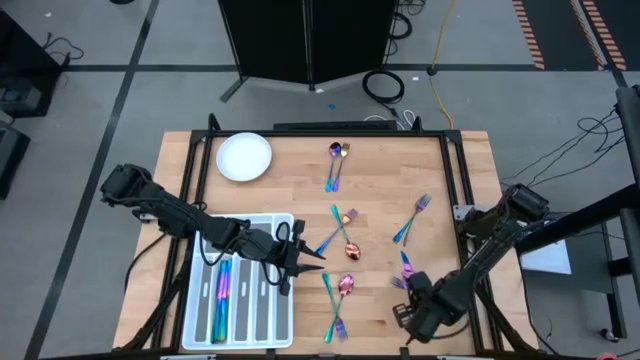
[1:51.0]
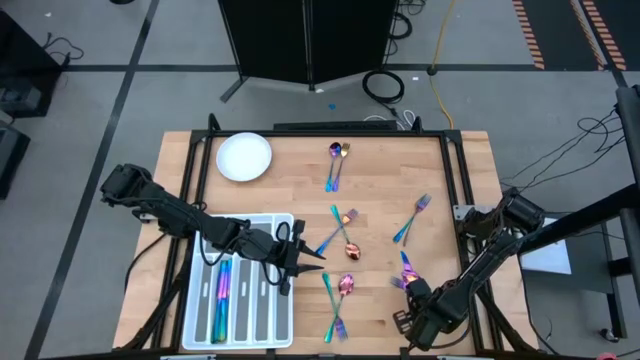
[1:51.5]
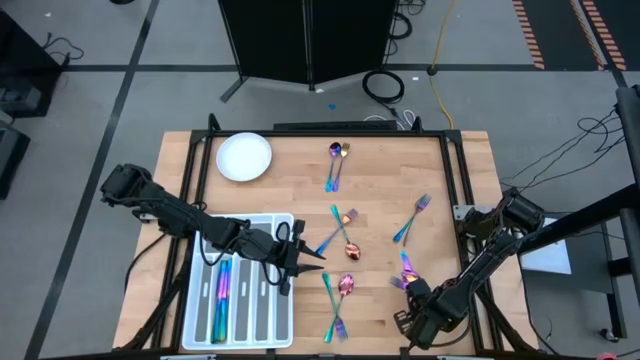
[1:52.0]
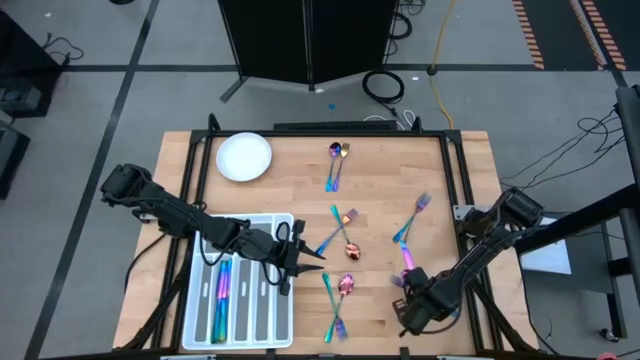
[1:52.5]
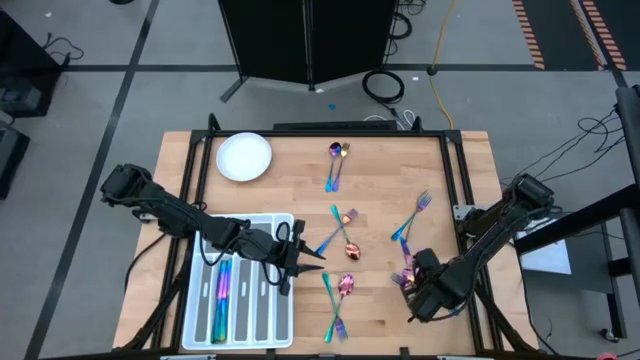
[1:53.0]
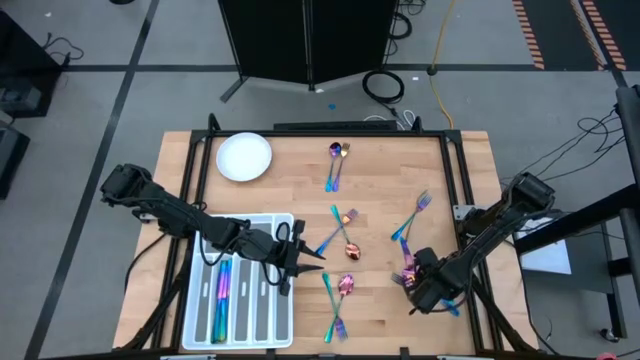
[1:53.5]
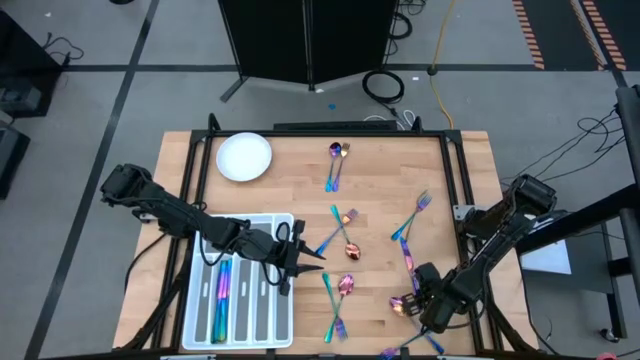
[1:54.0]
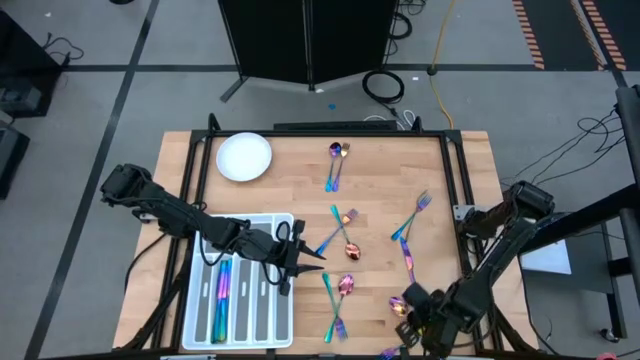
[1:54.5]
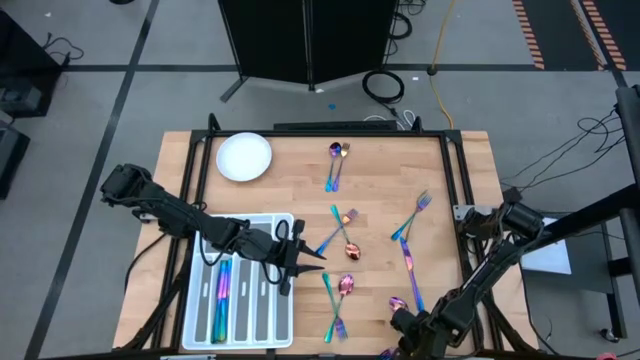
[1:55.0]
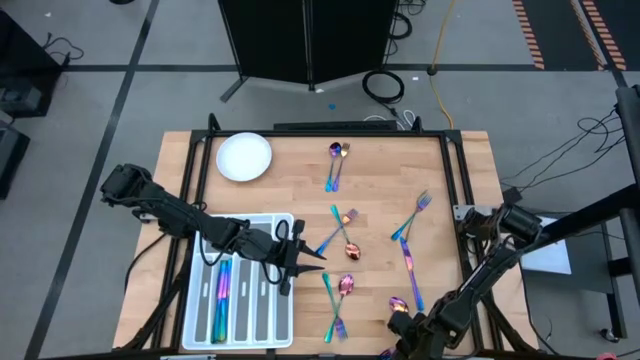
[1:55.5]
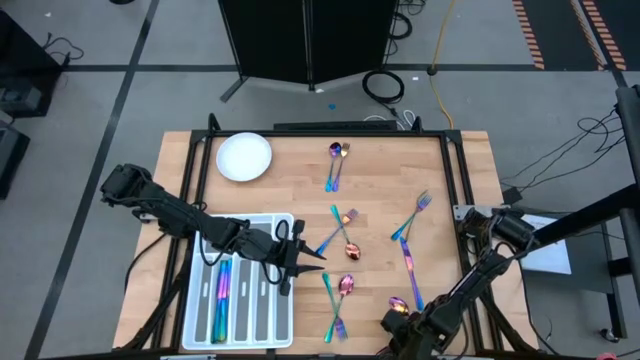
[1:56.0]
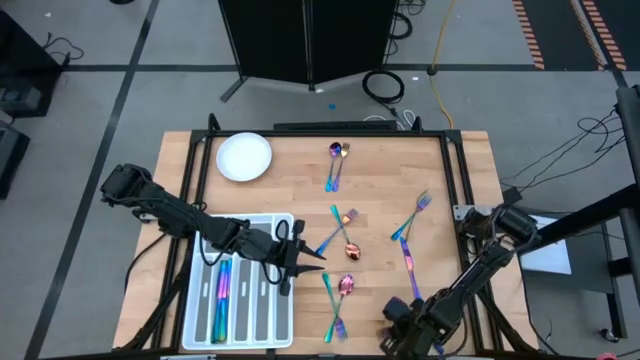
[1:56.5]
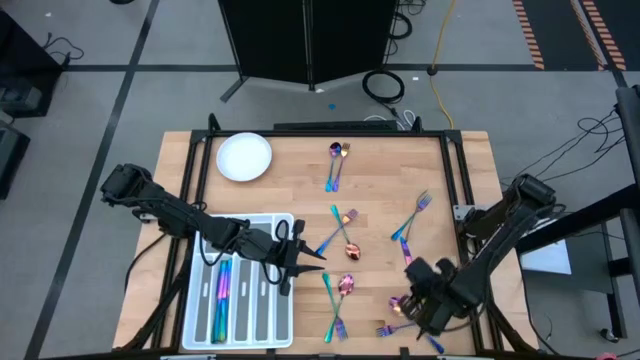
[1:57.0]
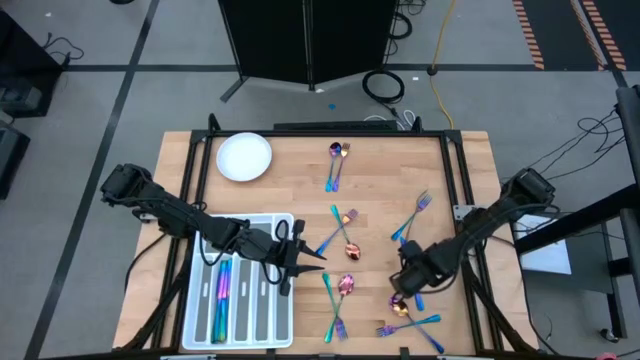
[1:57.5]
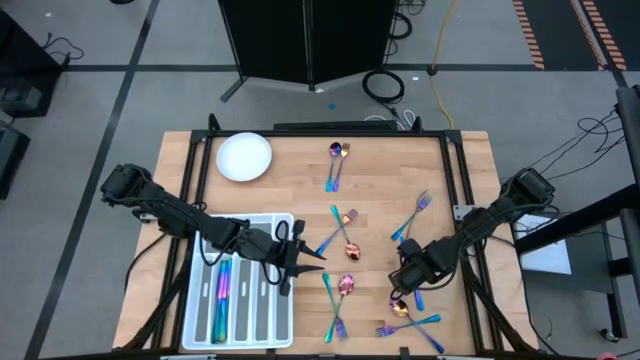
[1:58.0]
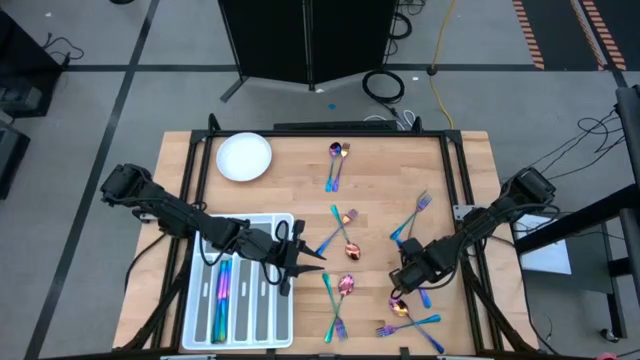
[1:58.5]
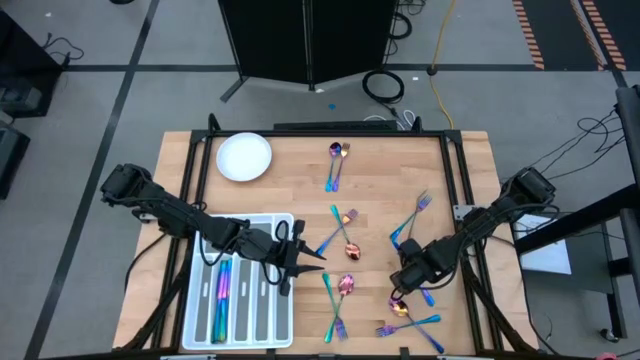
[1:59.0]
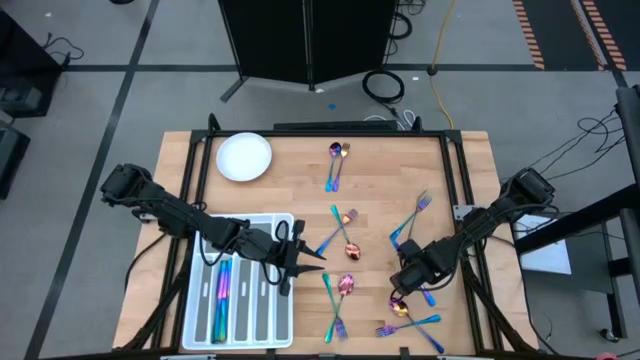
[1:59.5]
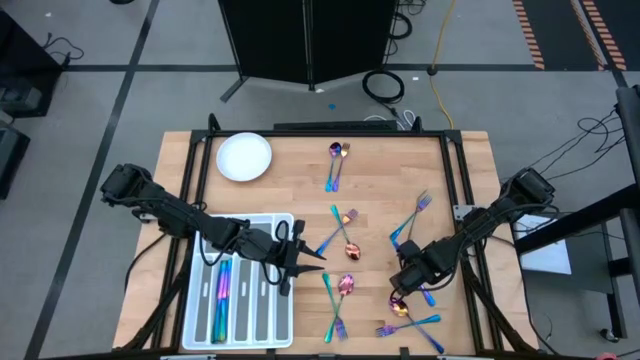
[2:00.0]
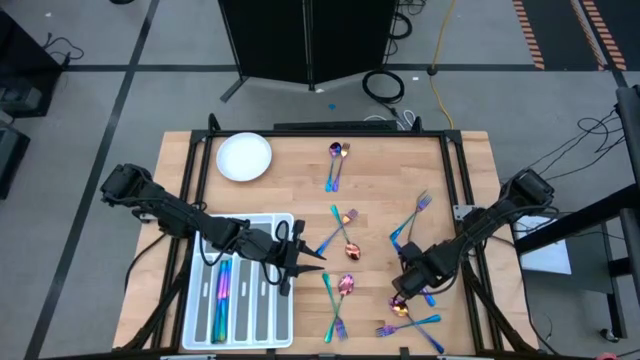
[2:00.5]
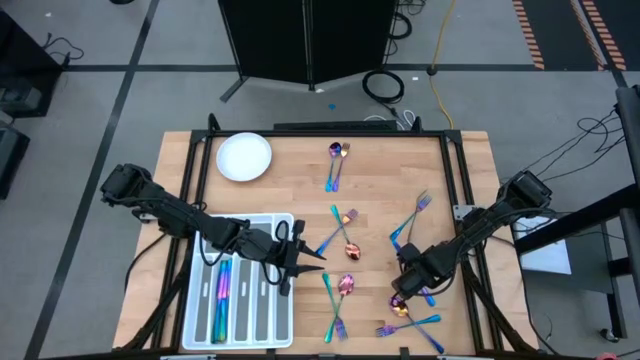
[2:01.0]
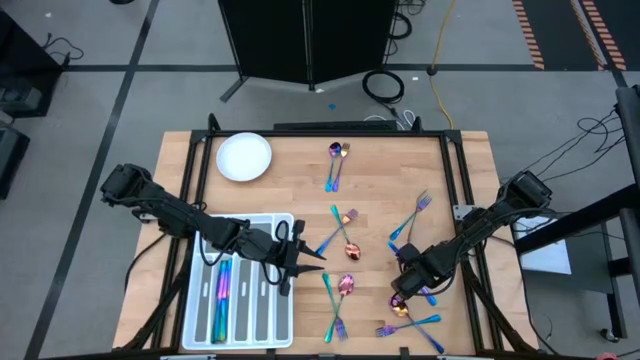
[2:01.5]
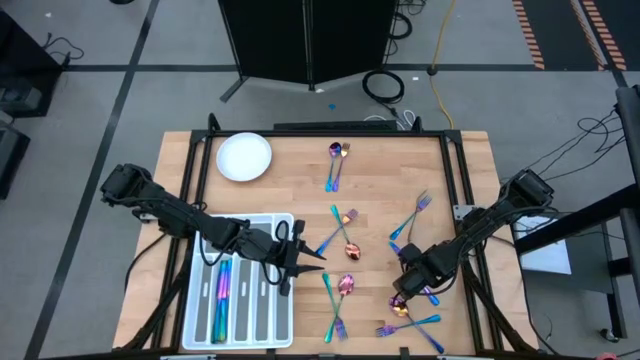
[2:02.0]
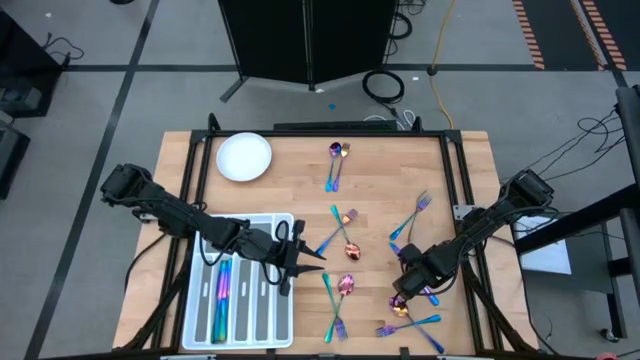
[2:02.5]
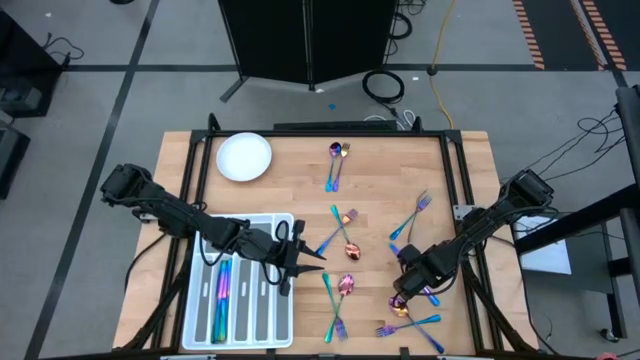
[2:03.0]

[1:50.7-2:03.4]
Task: Sort silverware
Put the iridescent blue knife in the silverware tray

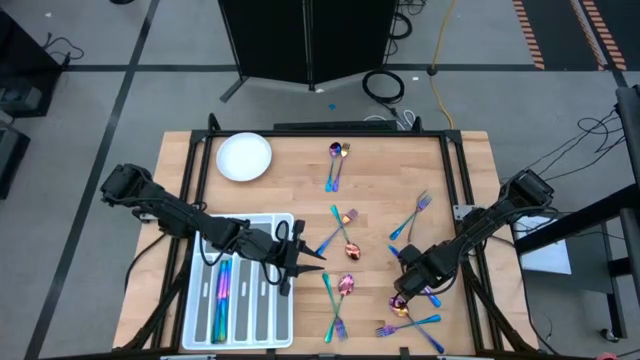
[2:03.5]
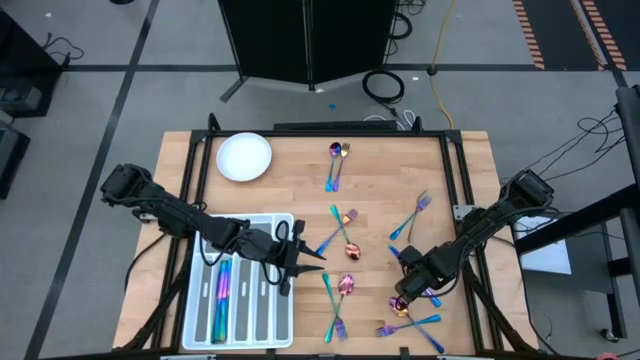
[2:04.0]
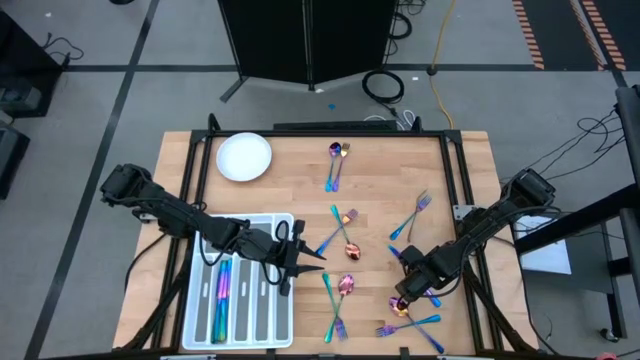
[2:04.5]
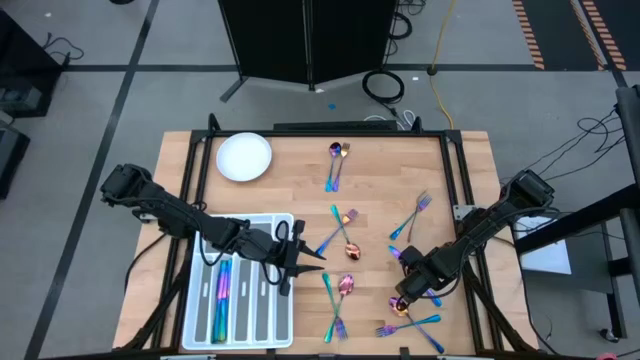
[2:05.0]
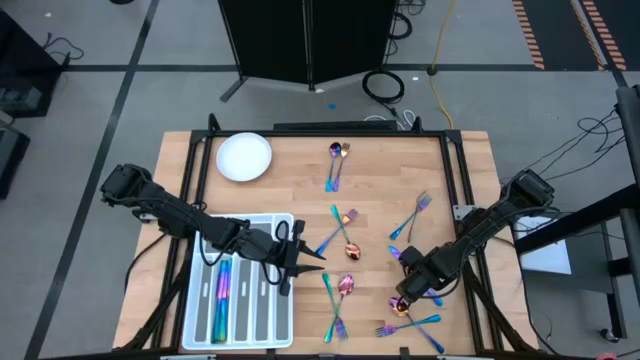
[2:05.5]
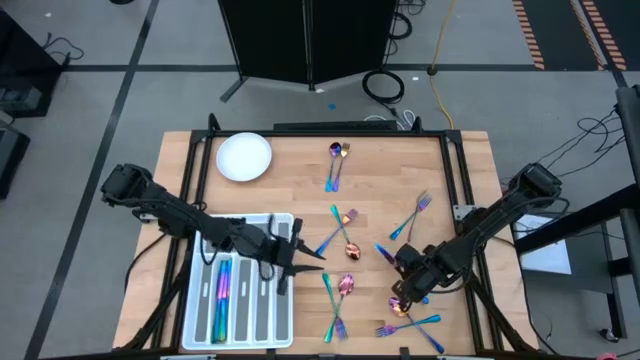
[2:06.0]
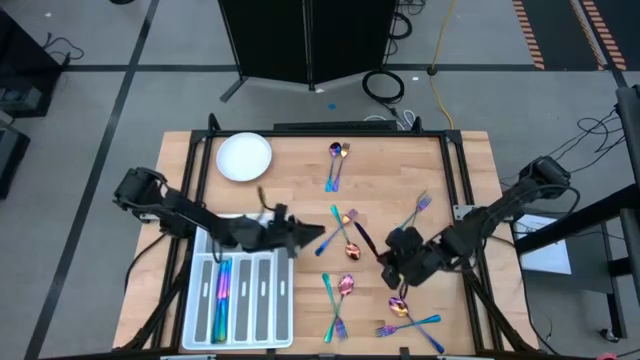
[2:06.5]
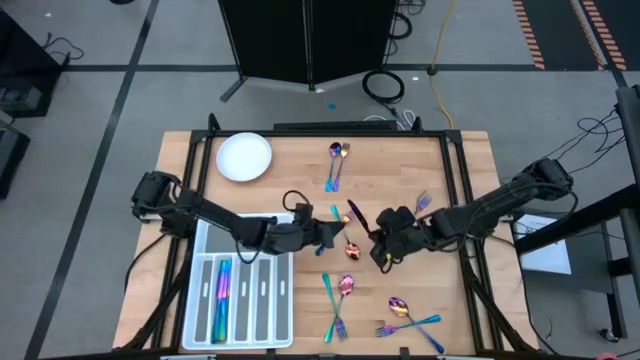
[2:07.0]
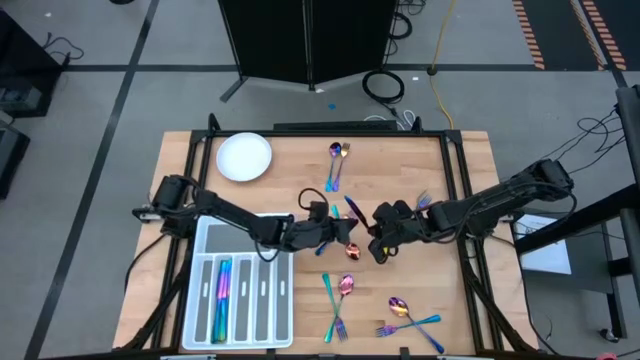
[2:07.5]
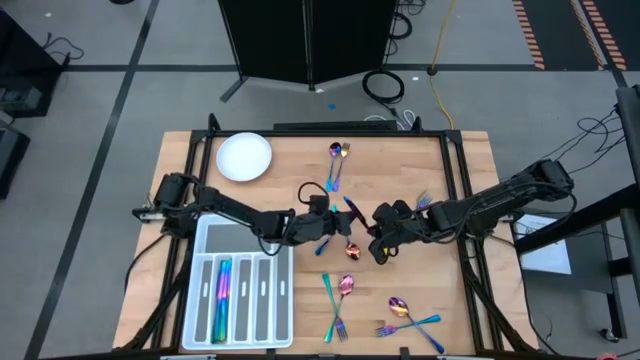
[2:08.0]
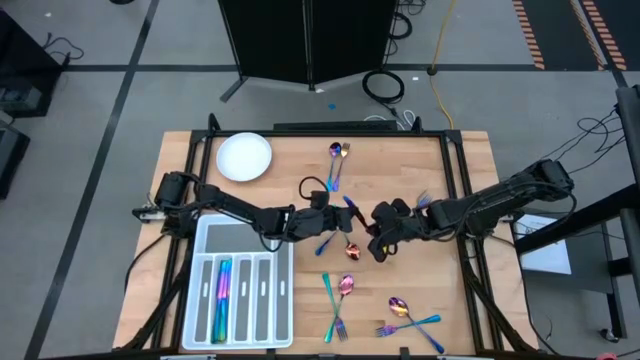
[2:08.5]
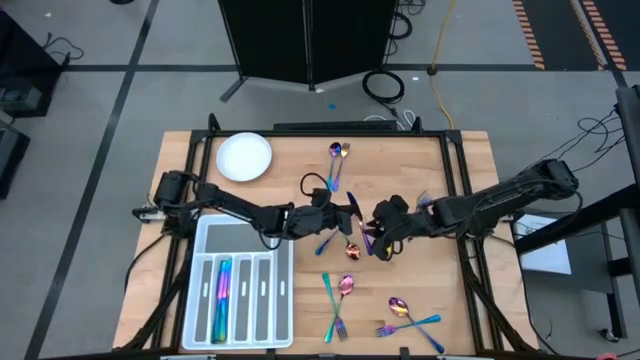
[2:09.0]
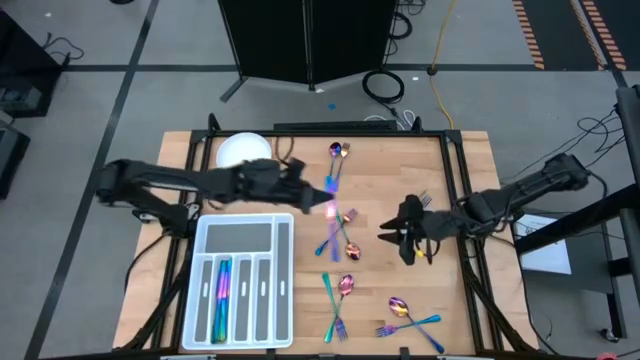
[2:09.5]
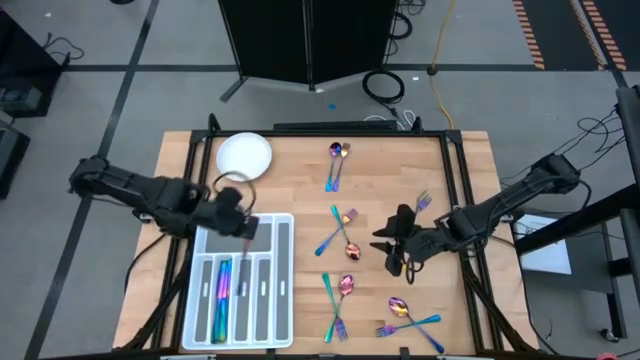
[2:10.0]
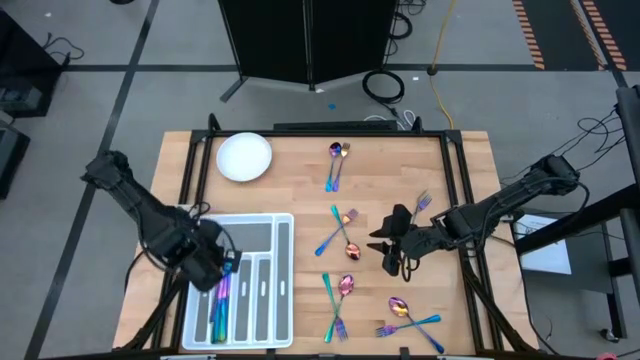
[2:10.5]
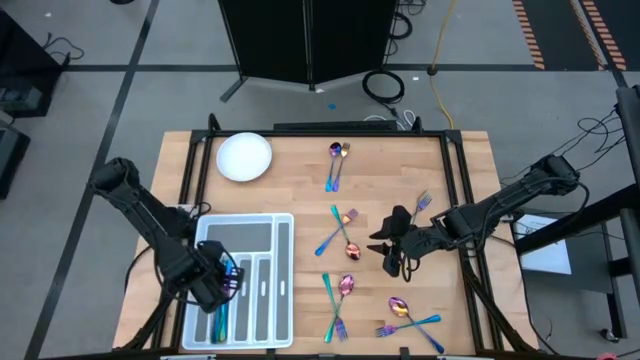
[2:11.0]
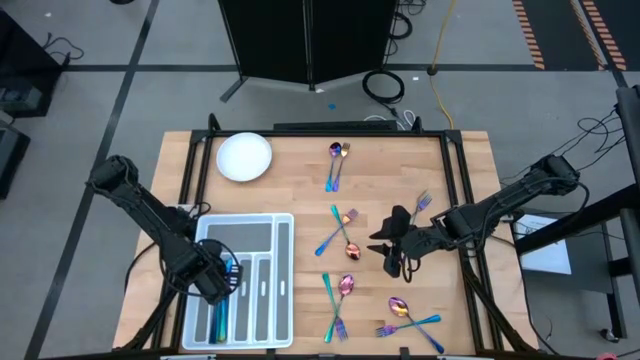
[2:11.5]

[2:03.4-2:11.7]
Put the iridescent blue knife in the silverware tray

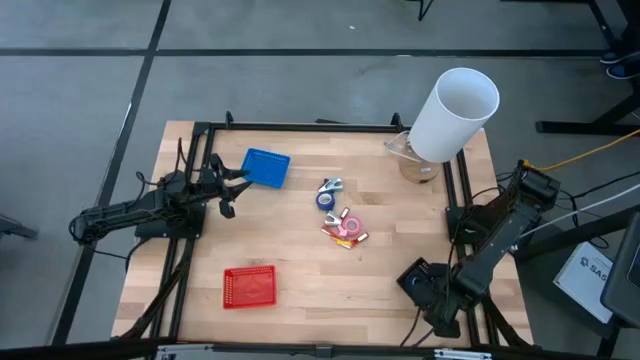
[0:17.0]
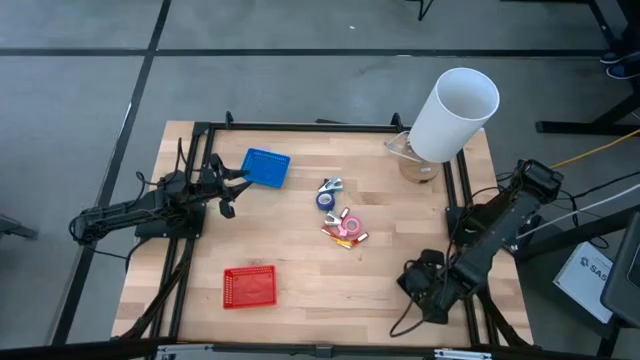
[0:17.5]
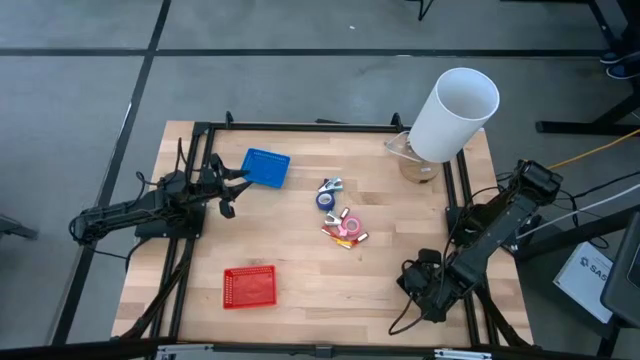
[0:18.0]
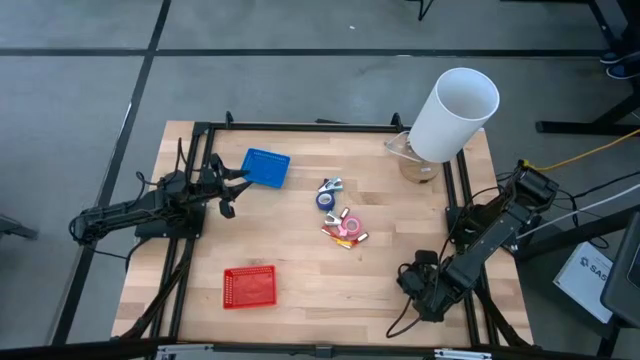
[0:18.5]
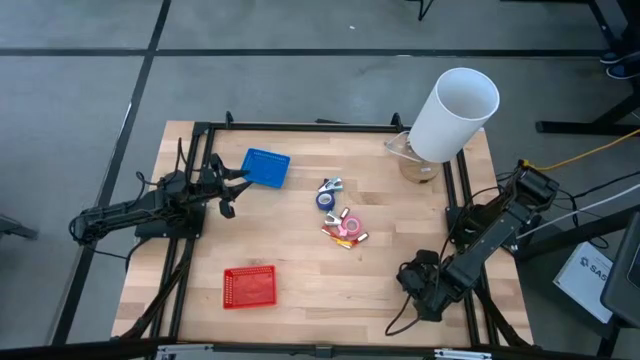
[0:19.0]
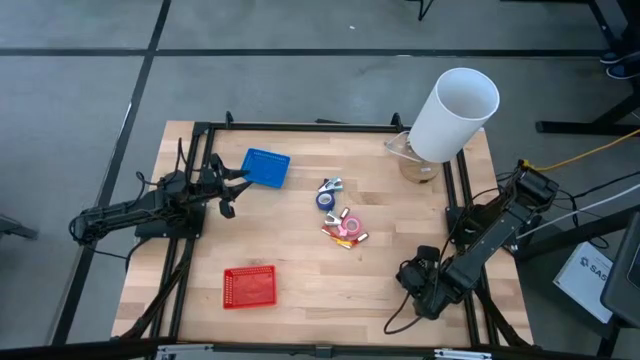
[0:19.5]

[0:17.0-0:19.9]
Task: Pick and place Stapler, Stapler remover, tape
Adjust the blue tape
